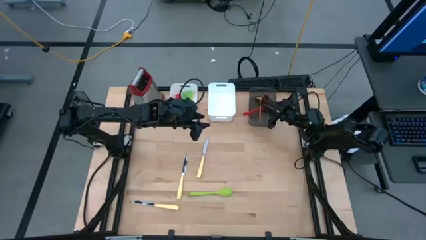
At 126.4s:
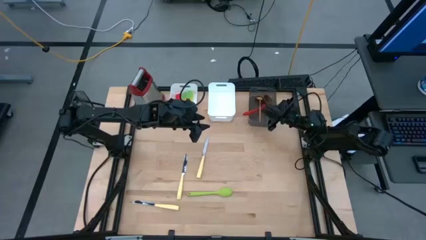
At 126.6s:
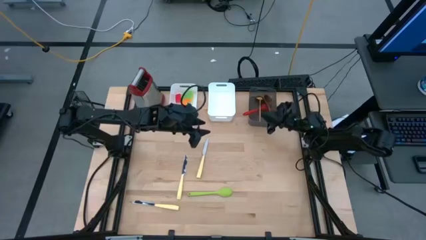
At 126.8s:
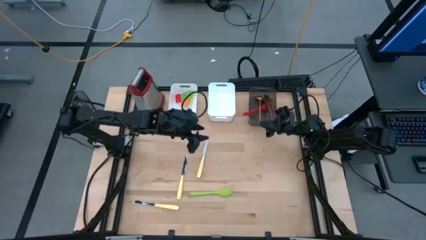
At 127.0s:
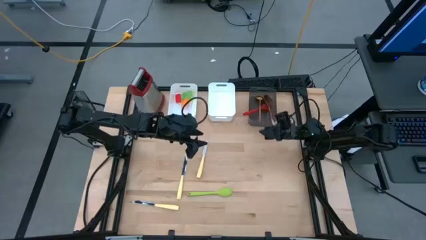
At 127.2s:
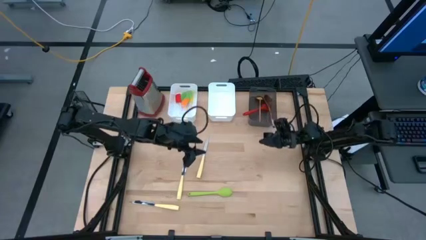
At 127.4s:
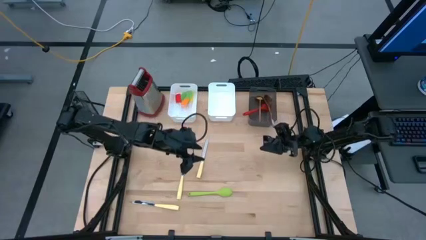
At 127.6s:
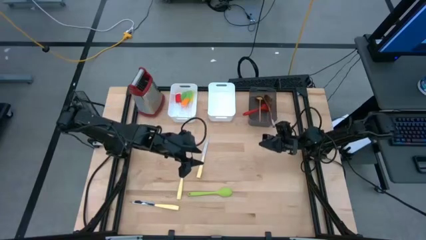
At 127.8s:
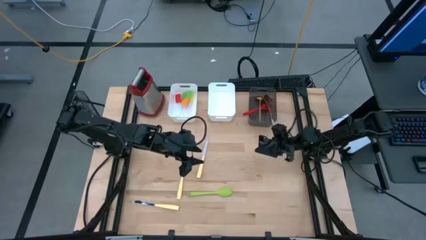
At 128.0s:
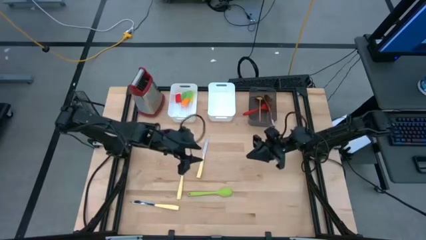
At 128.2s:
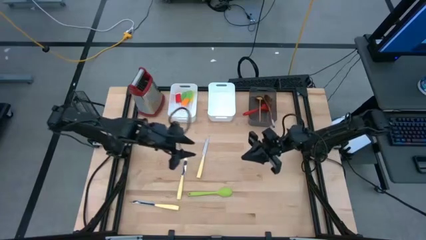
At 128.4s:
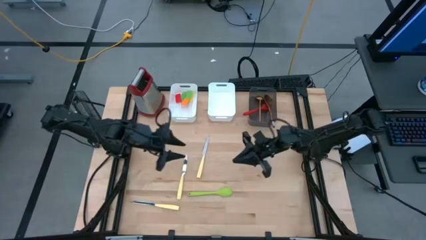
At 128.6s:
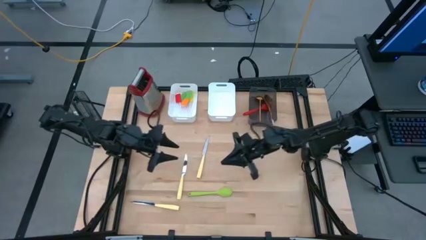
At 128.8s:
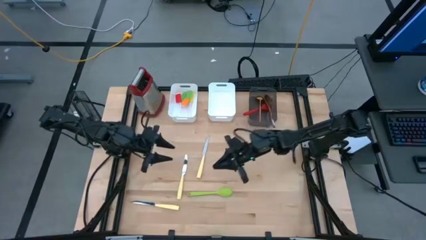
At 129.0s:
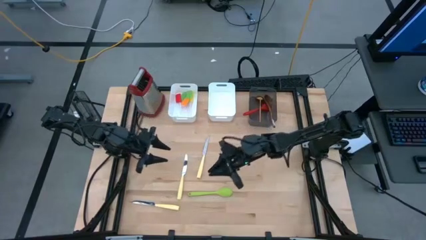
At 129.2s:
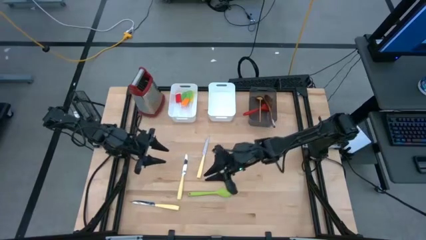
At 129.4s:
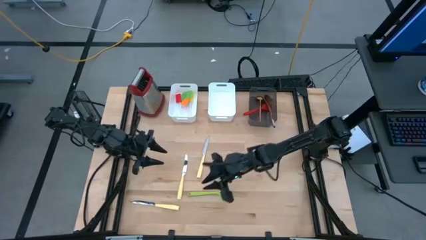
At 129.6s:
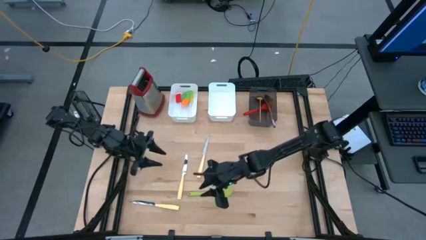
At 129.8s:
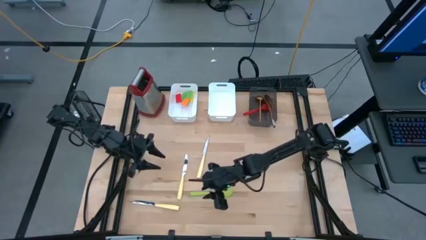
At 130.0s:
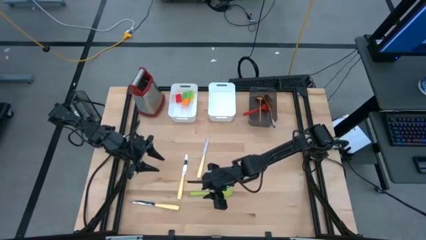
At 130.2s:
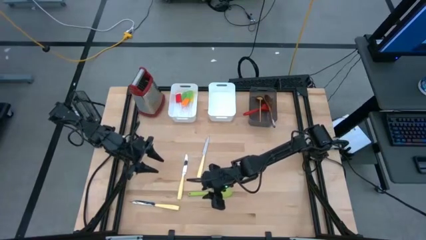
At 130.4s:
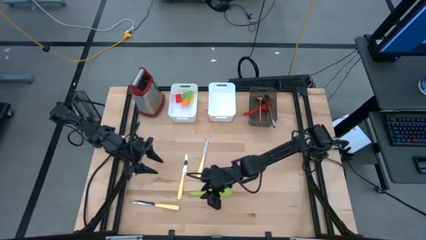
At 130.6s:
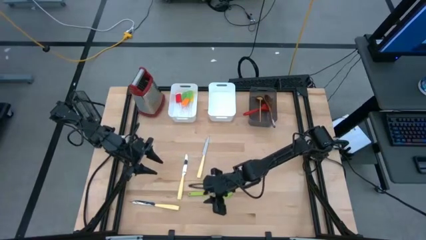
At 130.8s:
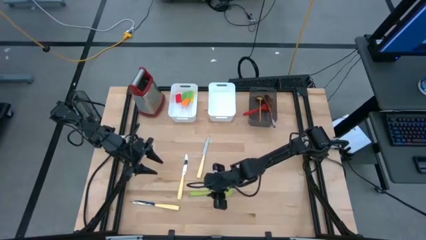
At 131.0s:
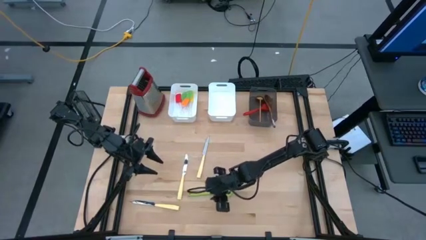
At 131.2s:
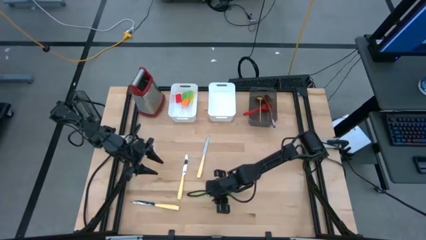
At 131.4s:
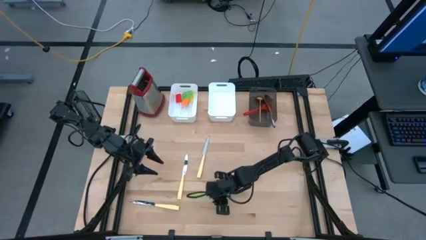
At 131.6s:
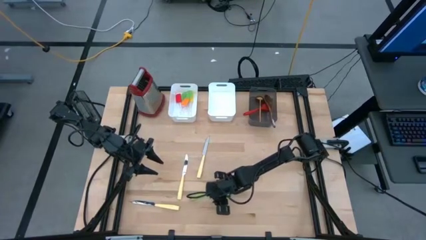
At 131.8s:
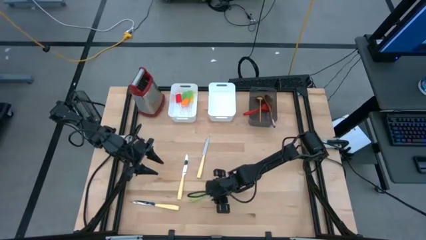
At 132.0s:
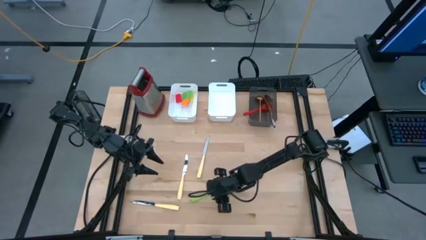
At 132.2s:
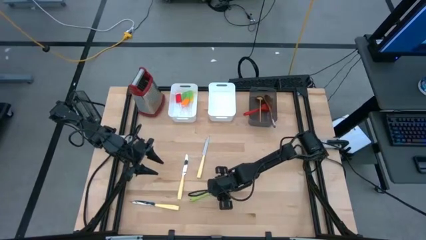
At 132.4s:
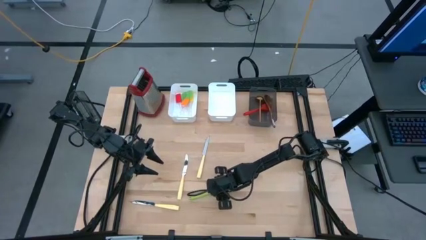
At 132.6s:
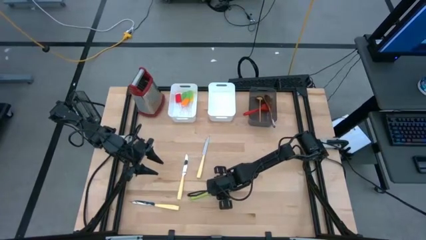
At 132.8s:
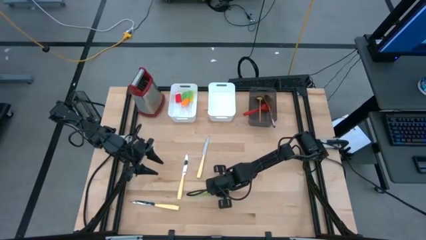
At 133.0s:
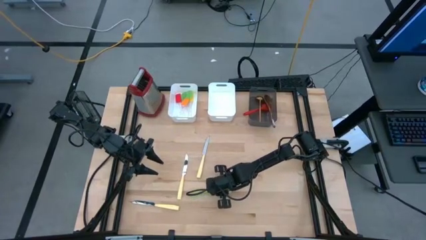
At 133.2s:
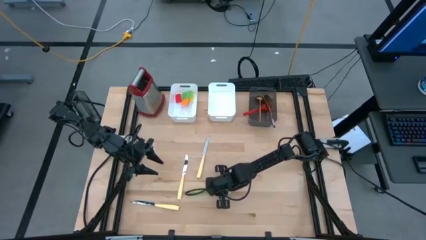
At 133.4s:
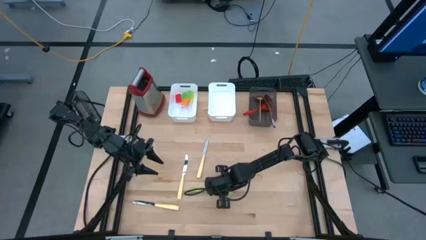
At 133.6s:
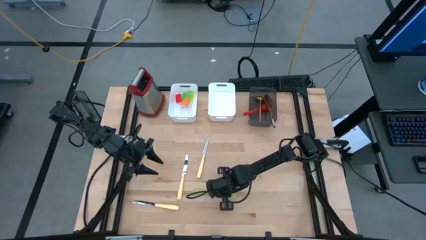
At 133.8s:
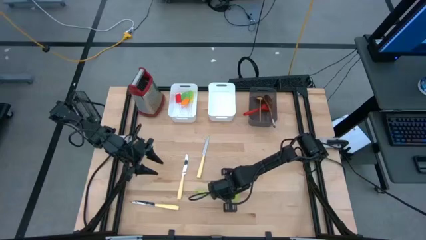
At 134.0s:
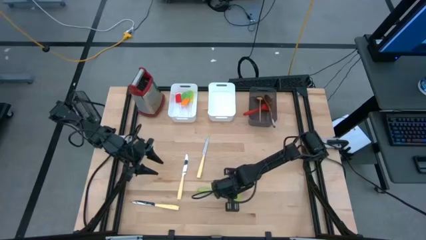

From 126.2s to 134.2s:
Task: Pick & Place Kitchen Items
Put the light green serving spoon into the black bin

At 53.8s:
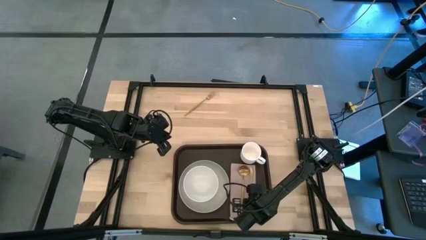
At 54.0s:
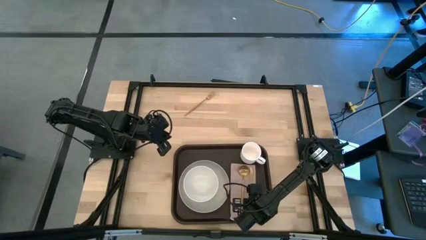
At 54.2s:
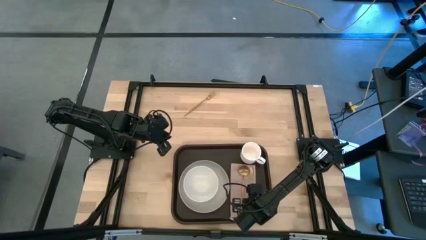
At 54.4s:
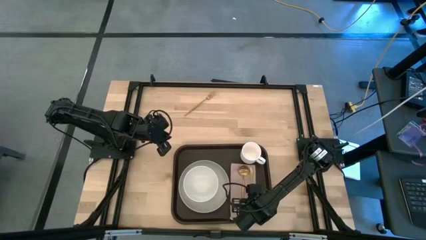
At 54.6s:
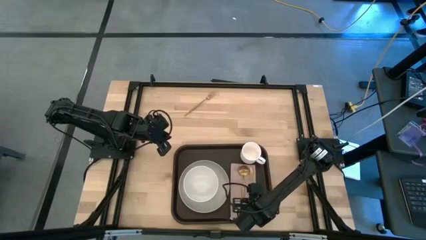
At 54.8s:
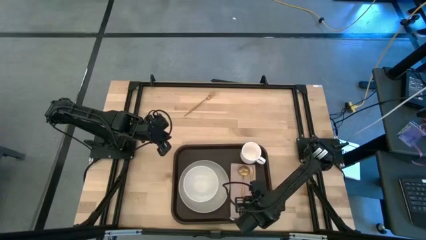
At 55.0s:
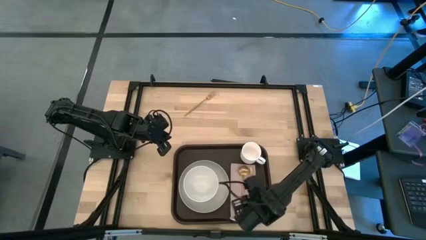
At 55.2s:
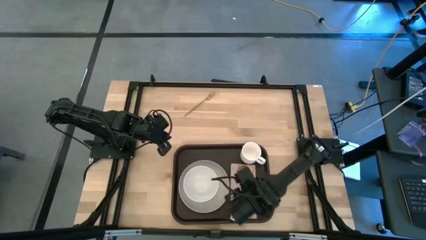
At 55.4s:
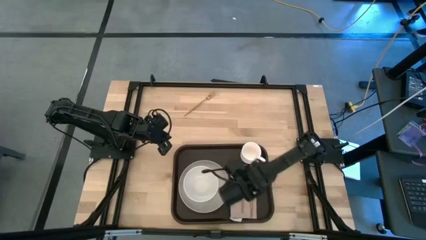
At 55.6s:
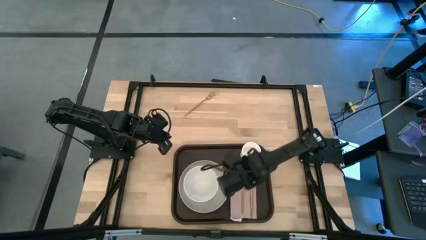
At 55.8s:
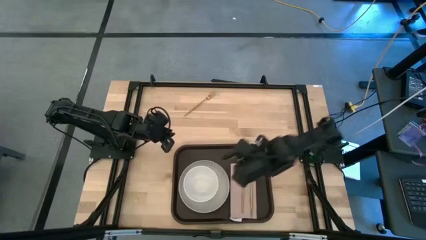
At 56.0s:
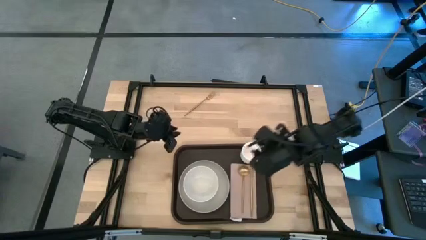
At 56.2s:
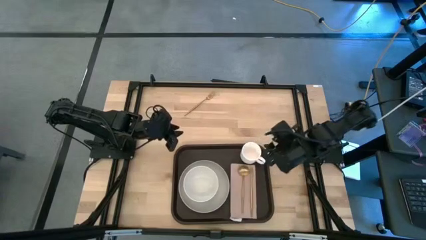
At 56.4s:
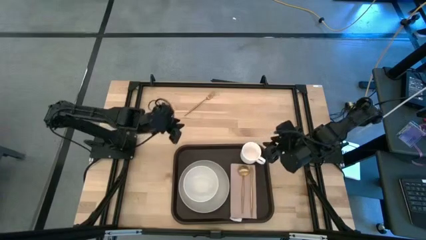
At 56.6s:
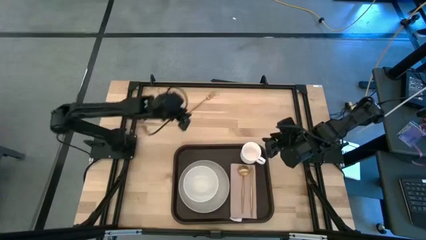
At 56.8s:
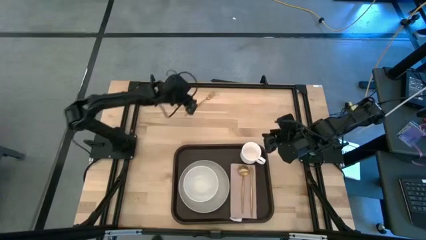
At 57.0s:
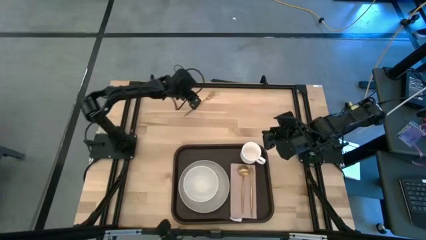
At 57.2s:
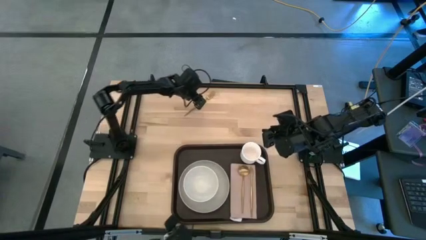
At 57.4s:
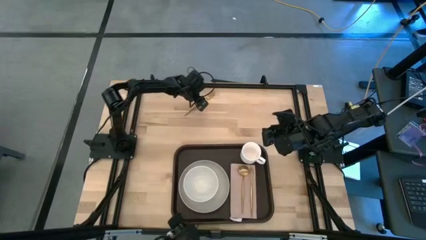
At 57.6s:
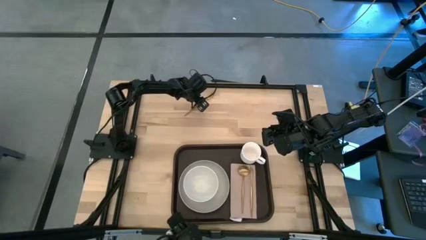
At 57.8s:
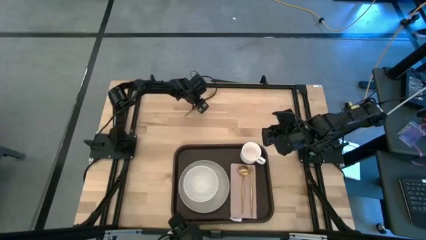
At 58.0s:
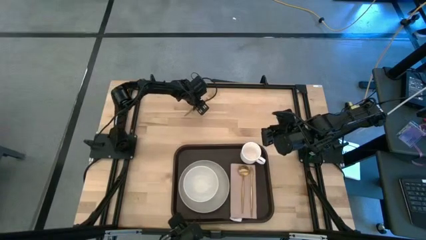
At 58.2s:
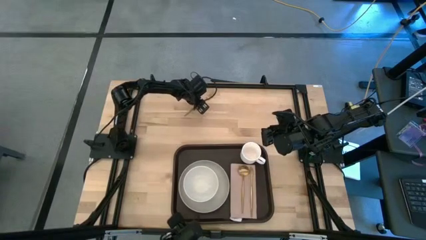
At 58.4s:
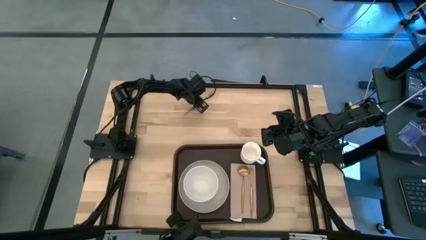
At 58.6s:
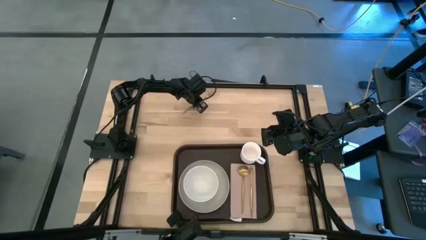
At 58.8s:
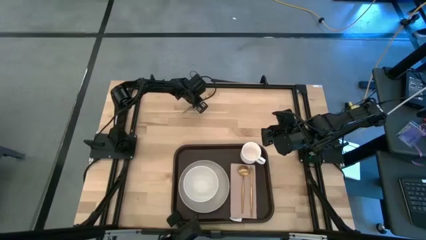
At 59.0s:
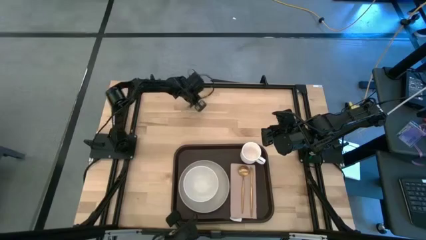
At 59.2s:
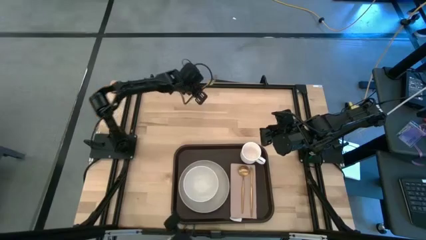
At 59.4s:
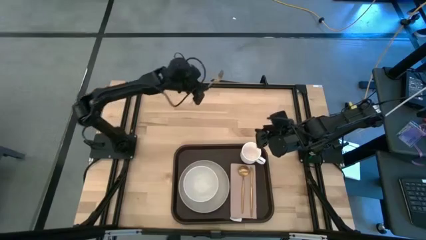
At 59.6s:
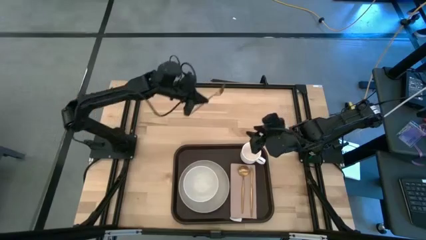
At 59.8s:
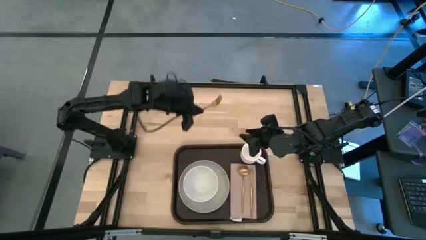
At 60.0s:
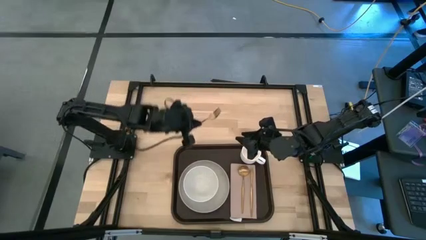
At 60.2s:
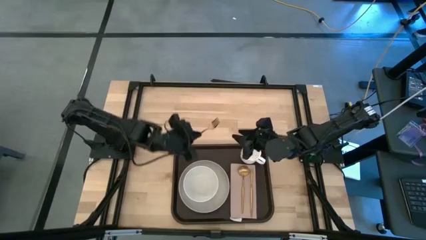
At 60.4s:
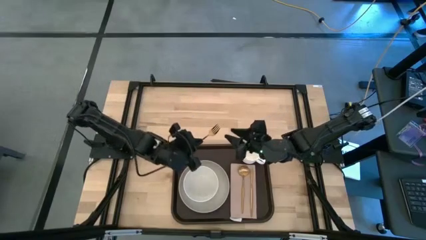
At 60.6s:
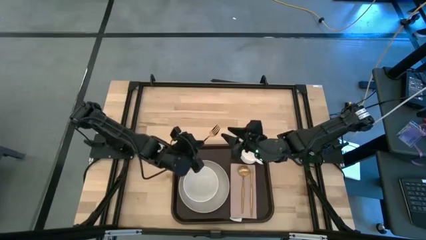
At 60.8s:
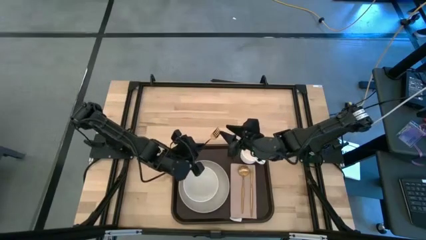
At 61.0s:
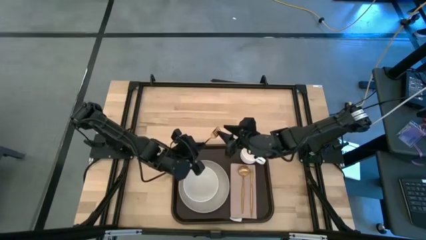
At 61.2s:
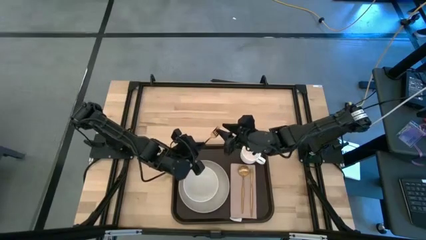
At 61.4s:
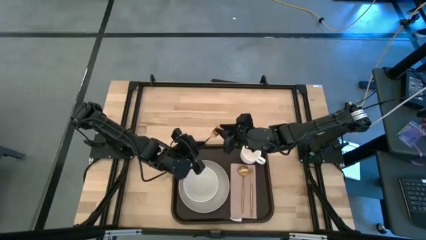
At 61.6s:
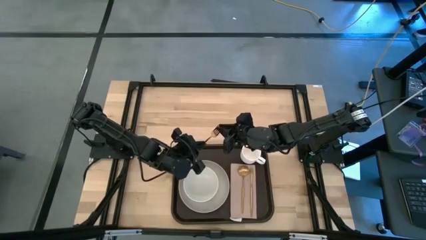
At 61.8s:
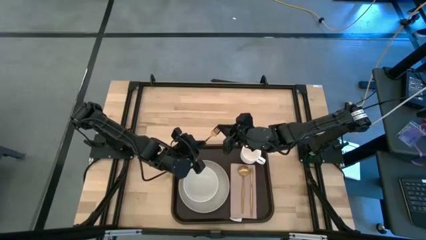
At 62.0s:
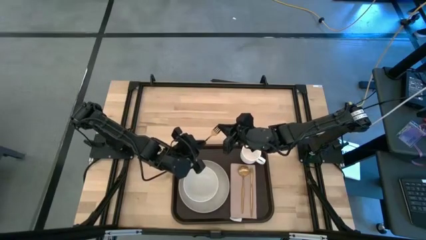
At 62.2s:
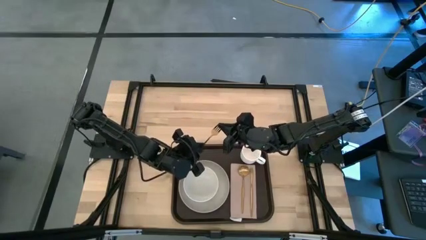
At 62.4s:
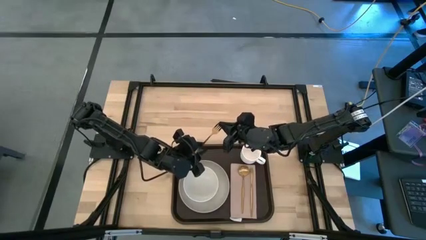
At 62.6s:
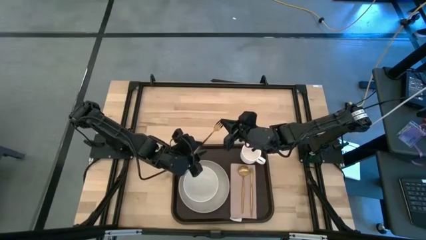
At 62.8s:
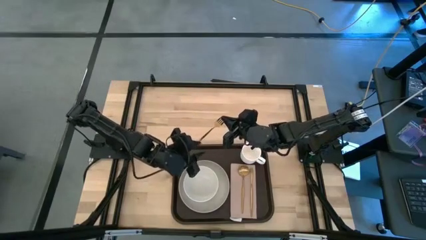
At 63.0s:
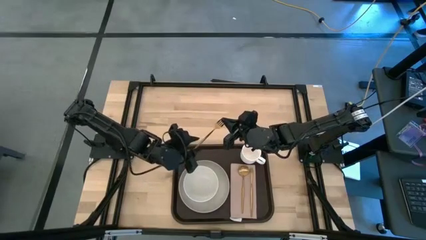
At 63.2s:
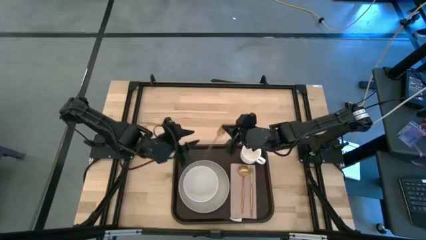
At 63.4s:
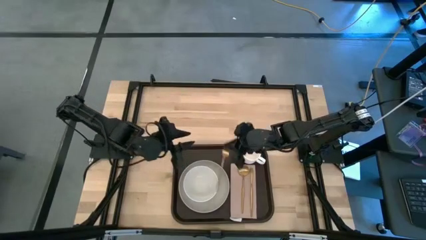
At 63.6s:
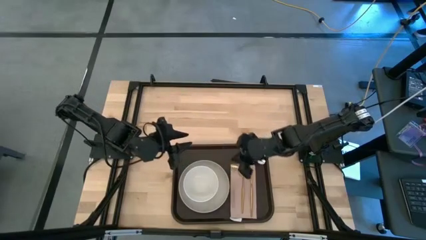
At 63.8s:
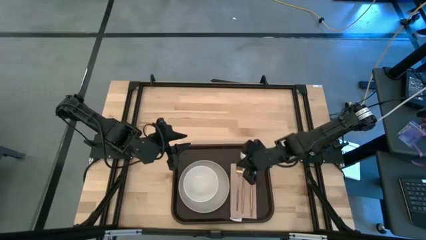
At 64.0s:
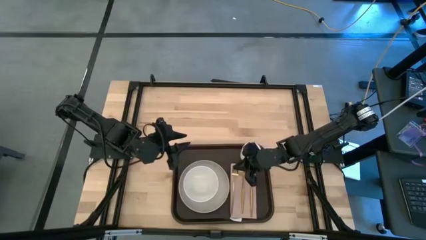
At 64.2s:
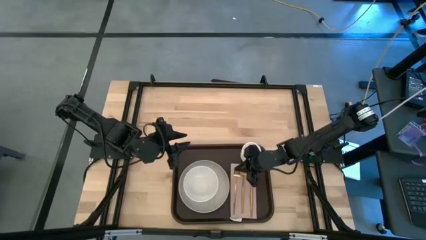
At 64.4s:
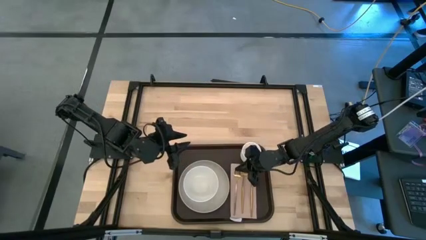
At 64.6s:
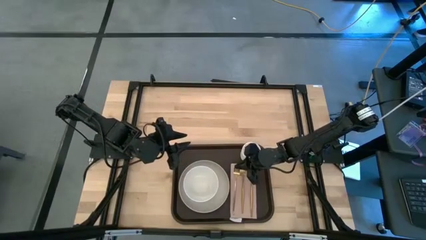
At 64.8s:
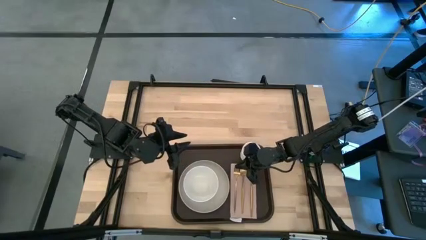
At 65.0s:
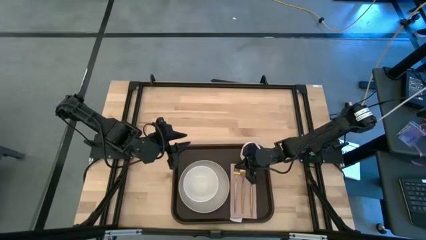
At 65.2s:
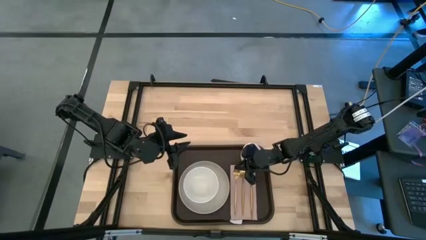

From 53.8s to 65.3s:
Task: Set up tray
Put the gold fork on the brown napkin to the left of the gold spoon
